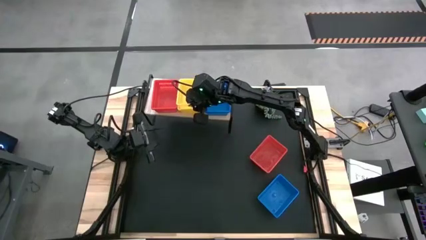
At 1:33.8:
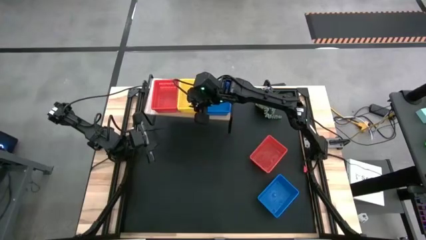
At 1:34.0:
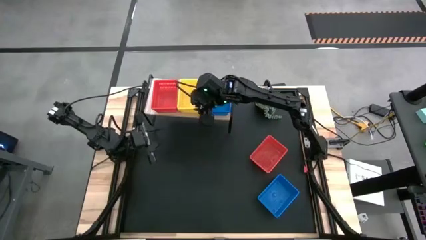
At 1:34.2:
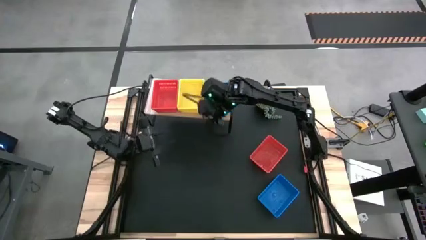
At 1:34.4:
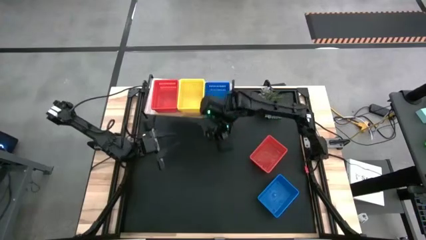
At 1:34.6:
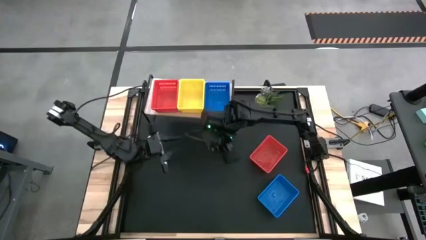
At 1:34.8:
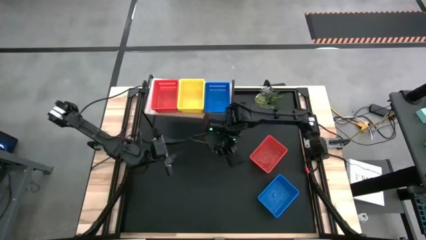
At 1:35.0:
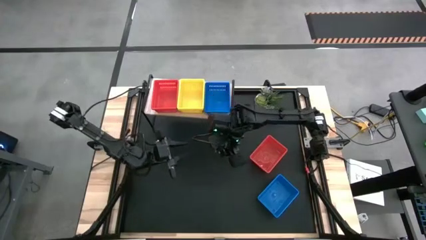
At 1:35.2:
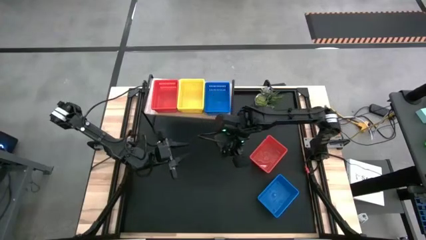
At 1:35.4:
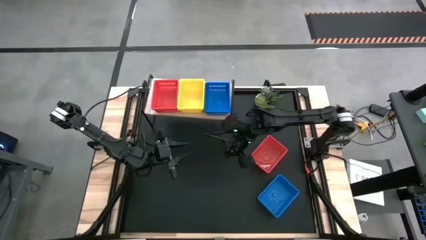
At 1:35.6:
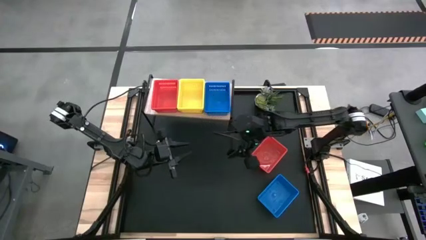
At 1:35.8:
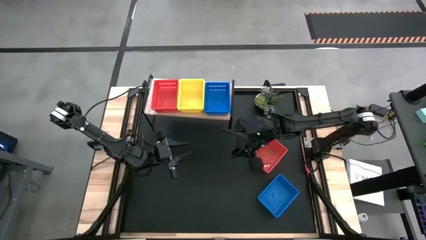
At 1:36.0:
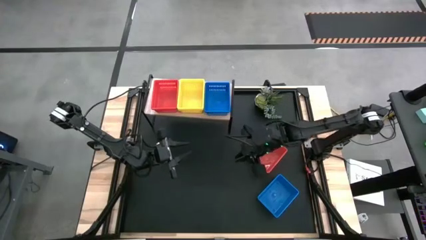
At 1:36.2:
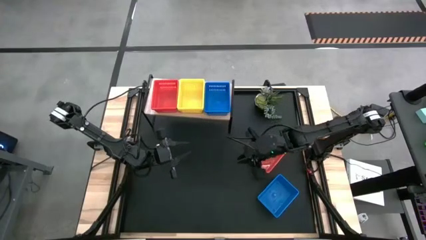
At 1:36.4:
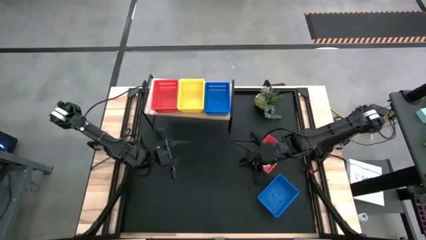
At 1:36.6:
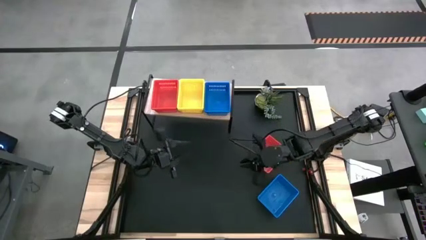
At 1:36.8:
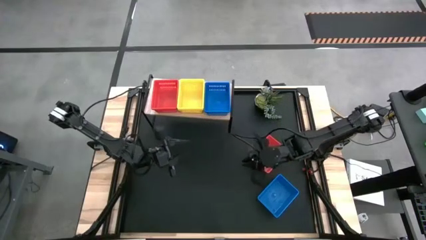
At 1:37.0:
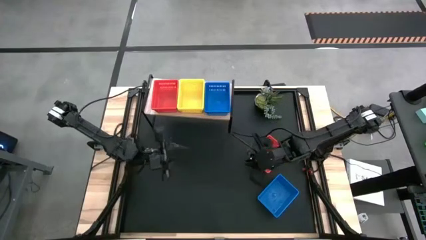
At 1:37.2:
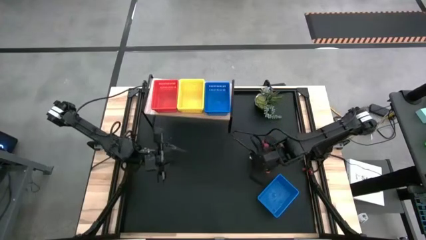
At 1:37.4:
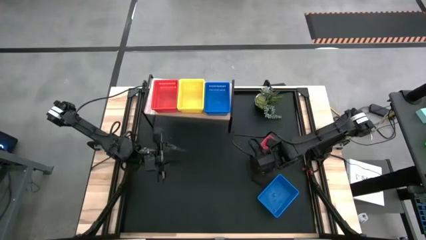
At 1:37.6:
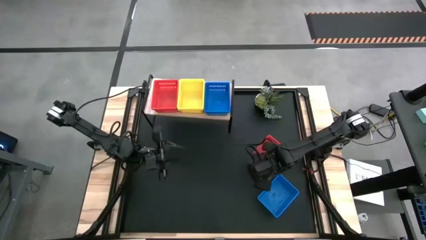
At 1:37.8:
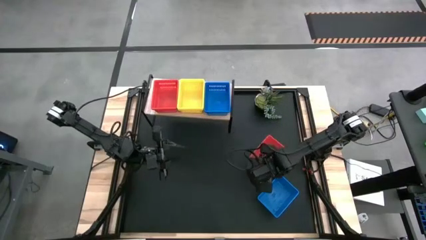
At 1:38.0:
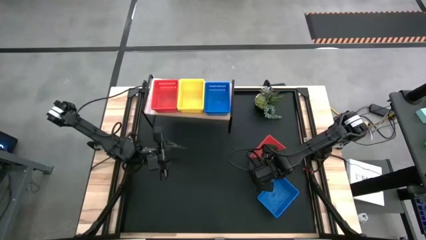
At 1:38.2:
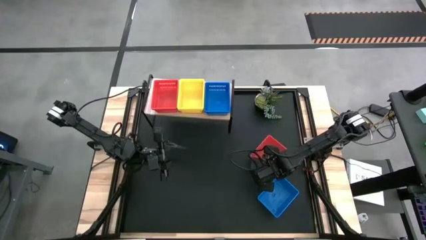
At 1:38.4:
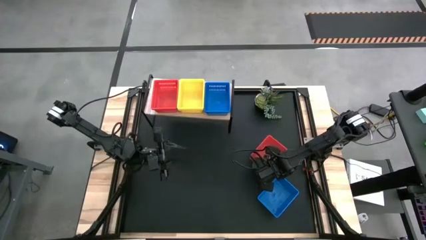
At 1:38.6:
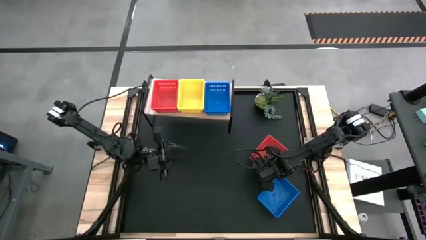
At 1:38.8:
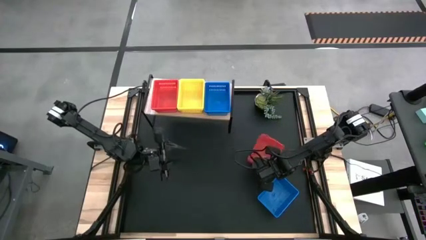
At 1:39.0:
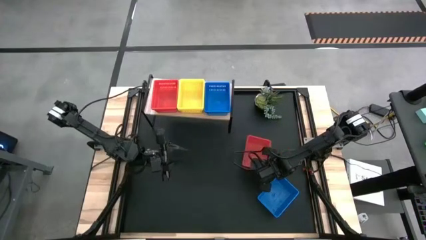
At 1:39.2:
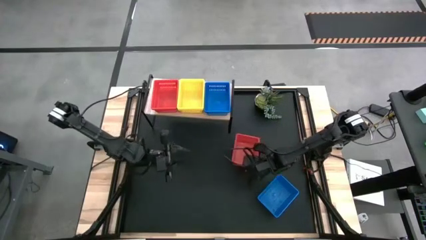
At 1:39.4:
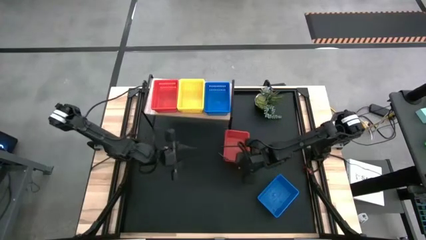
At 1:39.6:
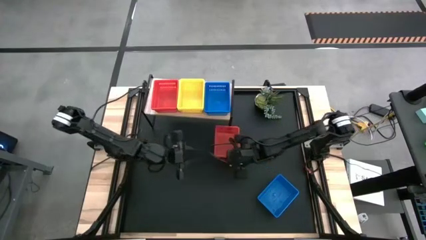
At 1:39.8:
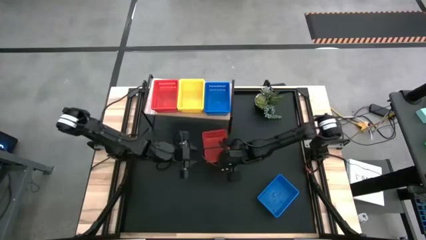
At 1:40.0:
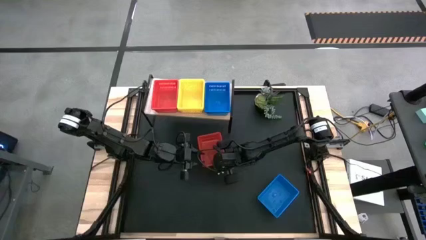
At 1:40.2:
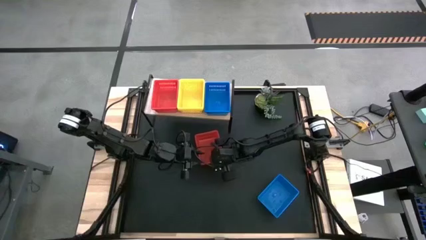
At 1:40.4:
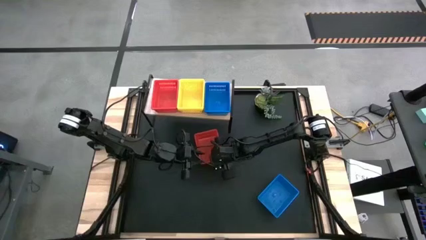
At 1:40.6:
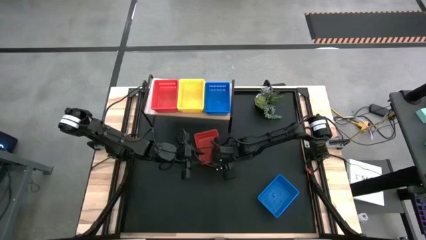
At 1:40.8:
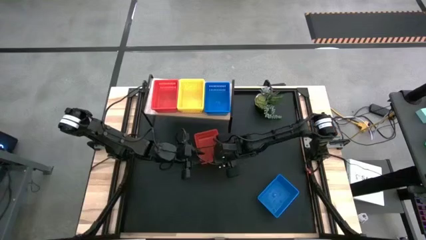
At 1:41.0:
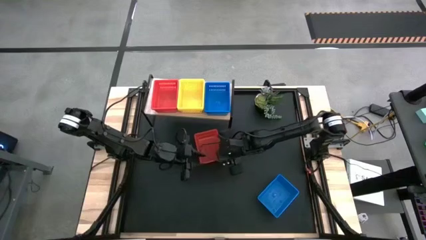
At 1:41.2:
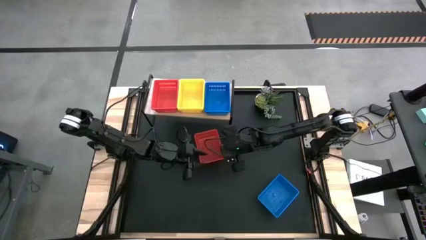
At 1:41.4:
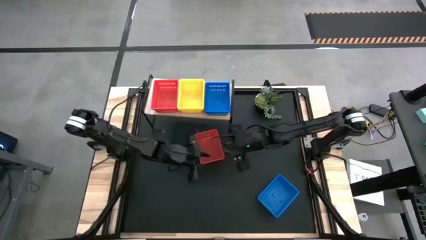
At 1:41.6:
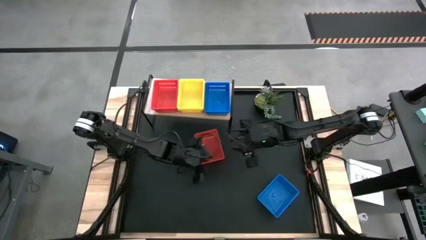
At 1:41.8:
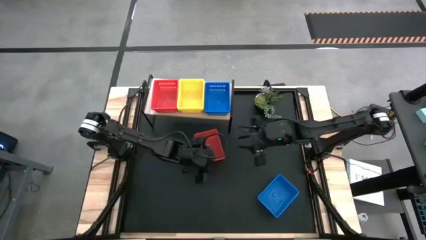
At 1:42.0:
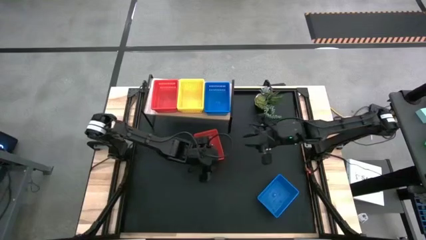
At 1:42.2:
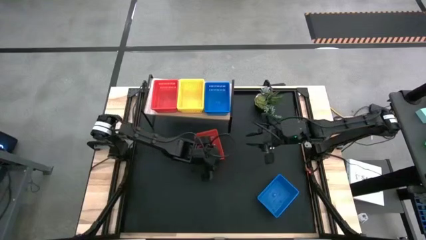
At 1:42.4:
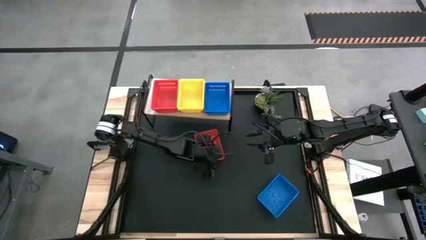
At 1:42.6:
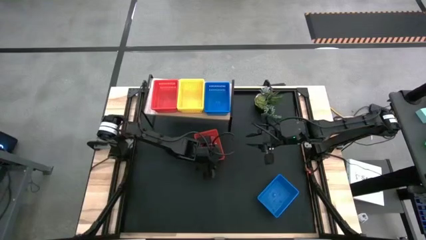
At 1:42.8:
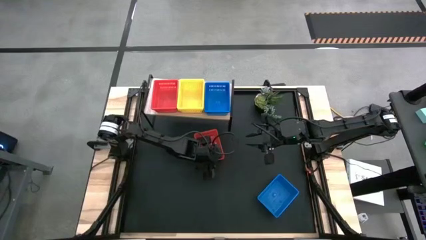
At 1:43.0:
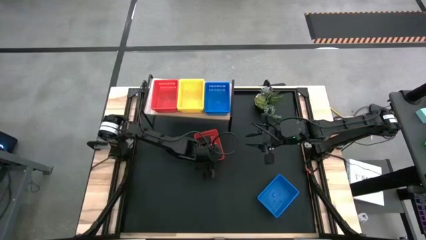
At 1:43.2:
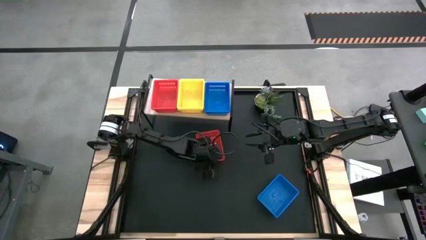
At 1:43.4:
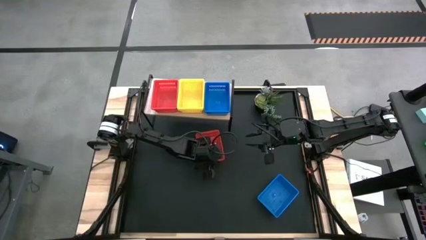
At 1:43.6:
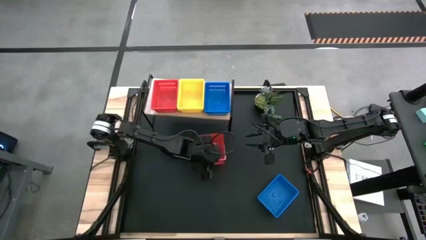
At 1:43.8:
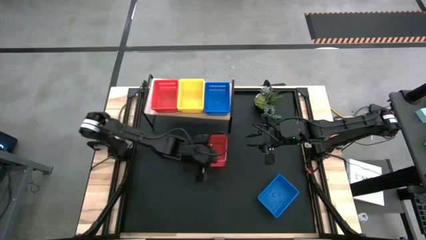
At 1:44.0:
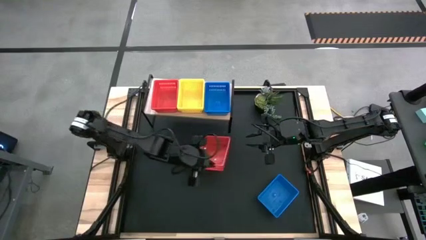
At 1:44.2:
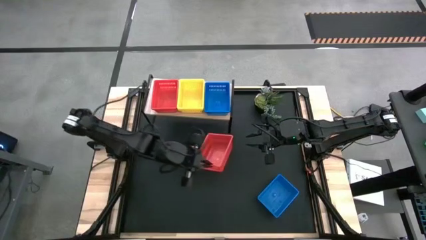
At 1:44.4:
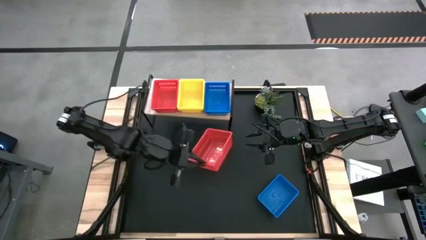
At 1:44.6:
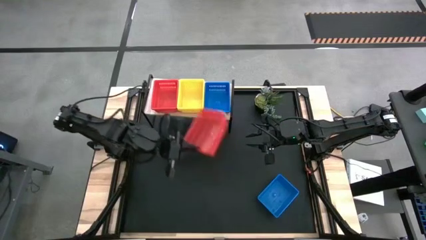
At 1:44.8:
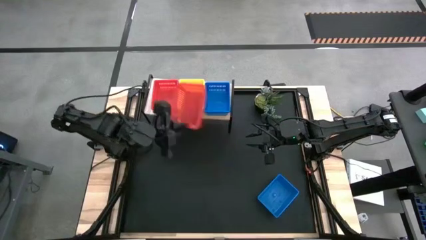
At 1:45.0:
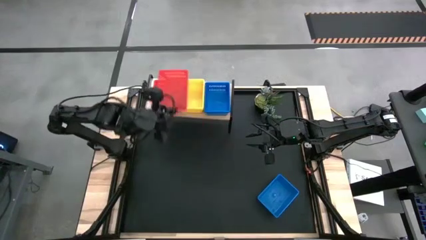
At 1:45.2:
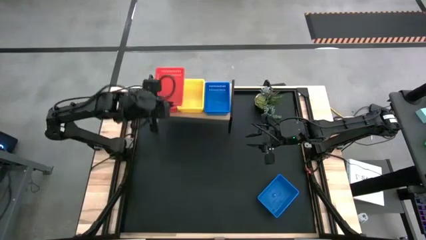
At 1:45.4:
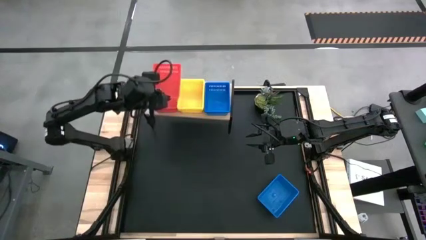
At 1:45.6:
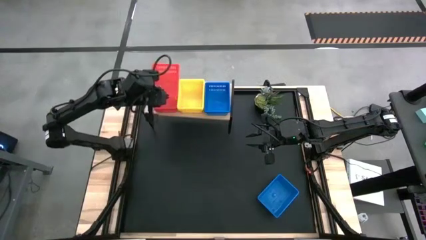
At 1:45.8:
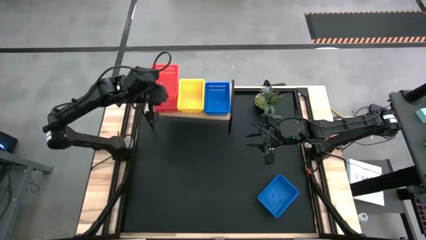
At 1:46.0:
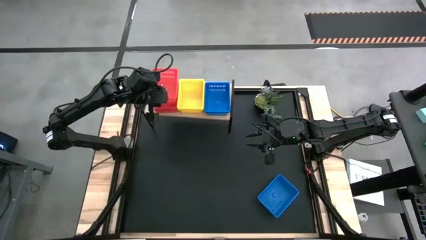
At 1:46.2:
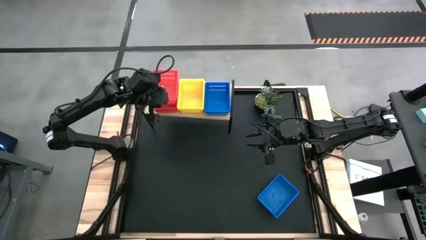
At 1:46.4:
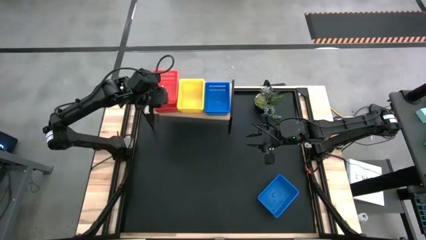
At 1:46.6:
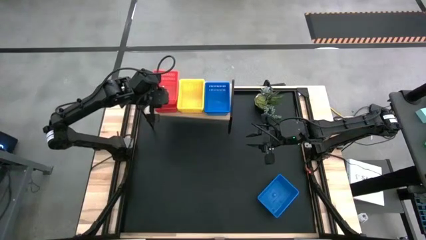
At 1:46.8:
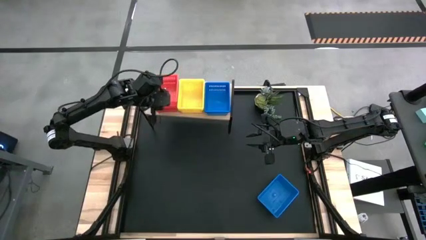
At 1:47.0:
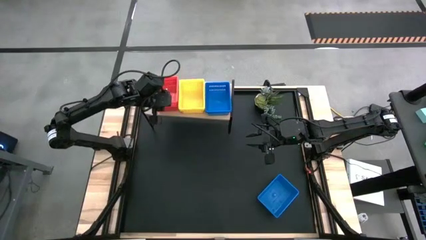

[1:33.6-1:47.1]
Task: Stack baskets on shelf by color
Stack the red bin on top of the red bins on the shelf
